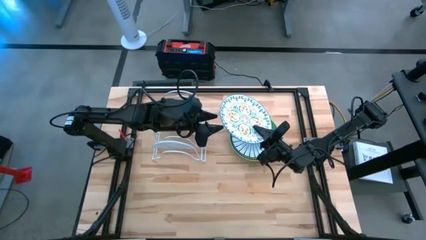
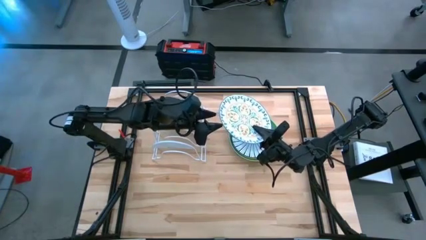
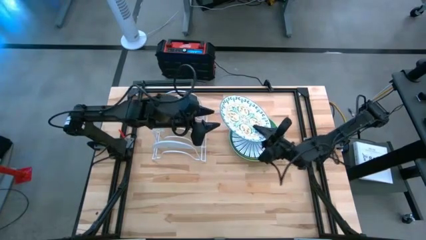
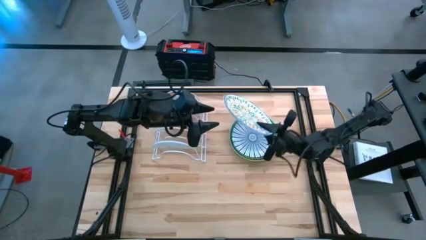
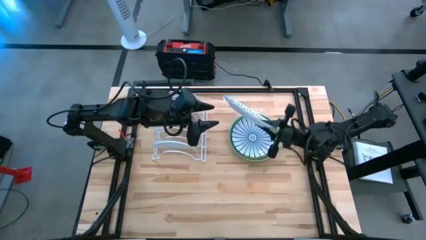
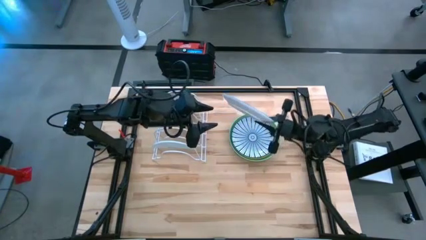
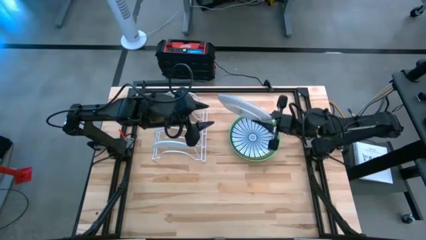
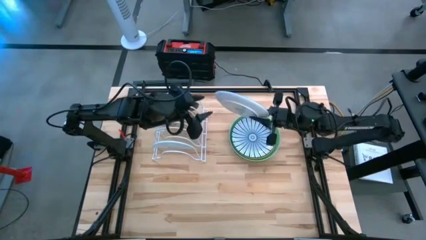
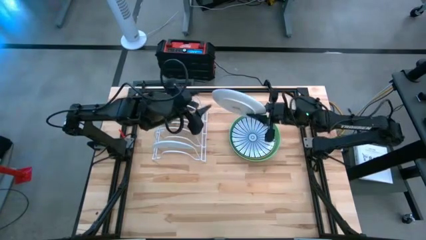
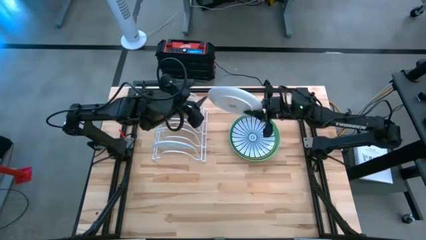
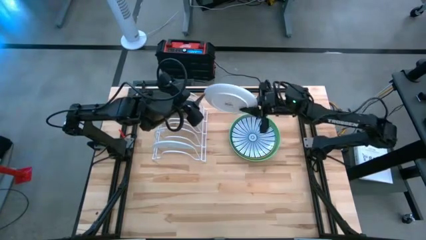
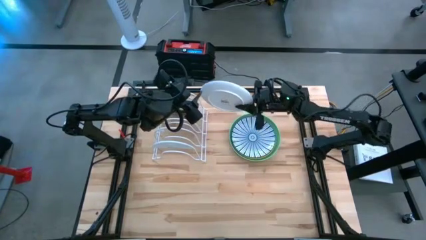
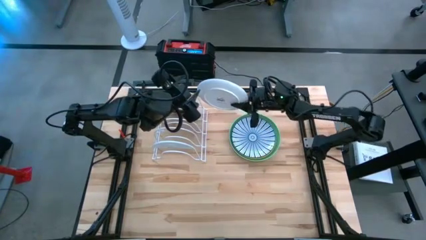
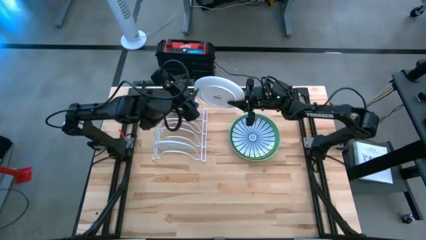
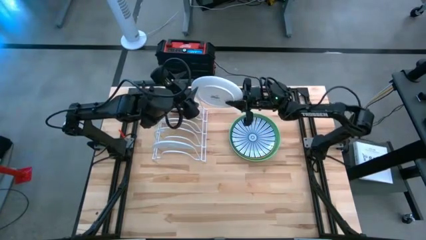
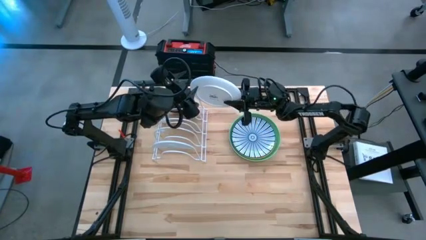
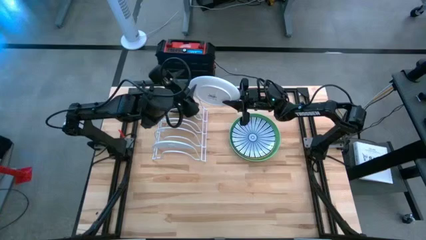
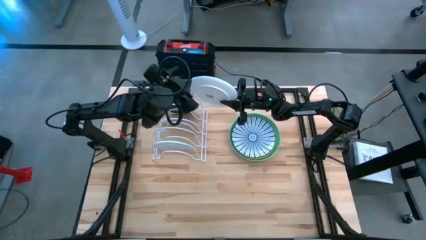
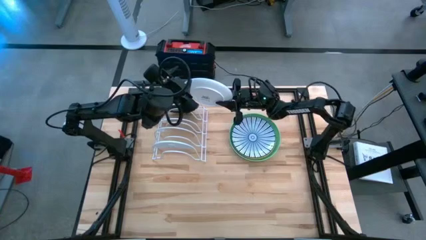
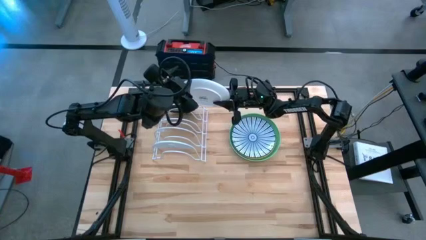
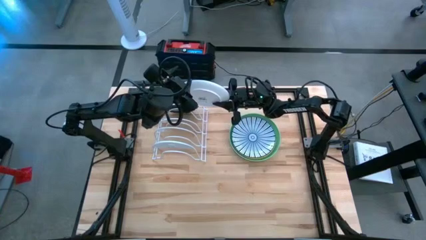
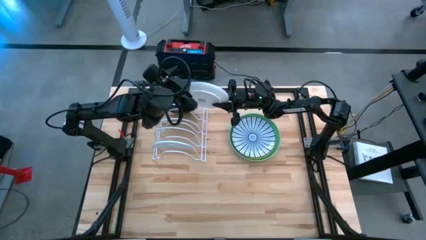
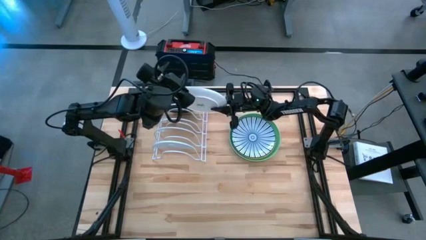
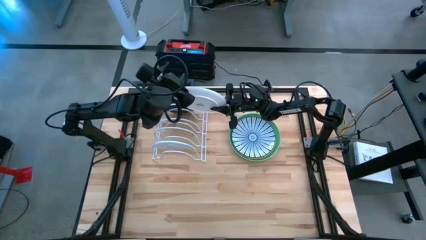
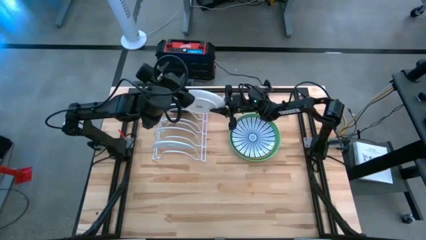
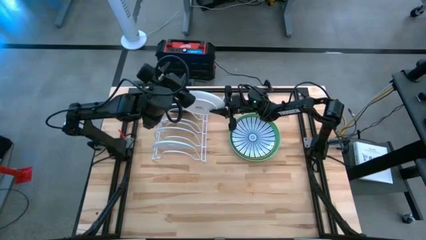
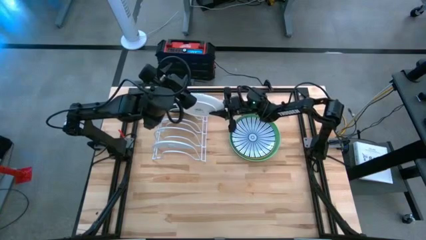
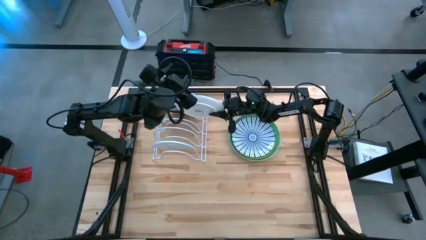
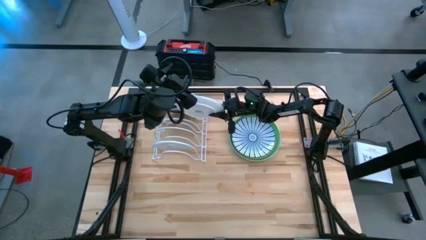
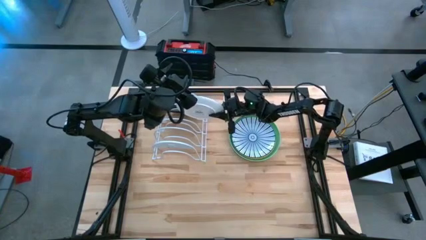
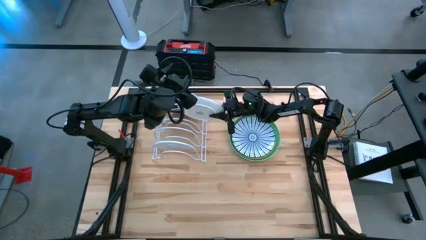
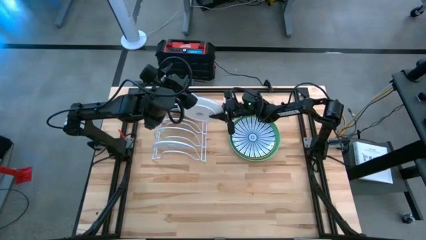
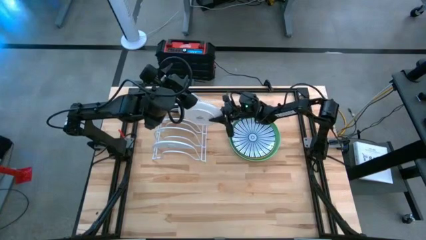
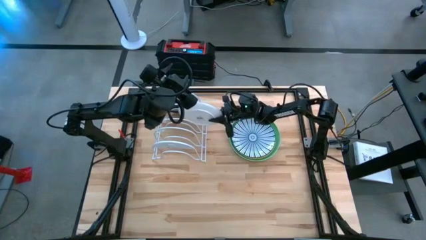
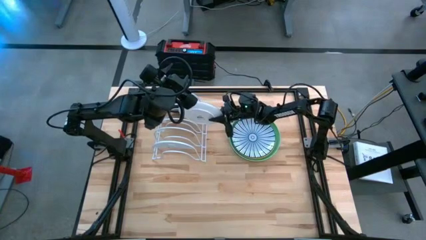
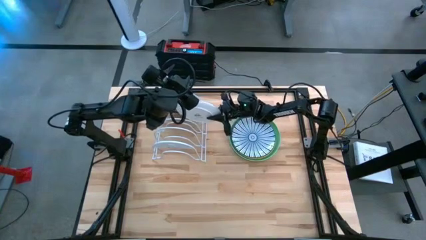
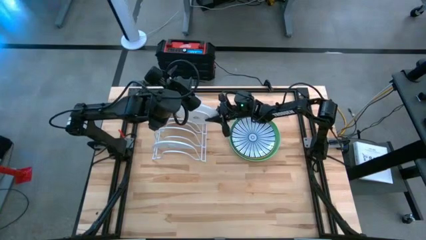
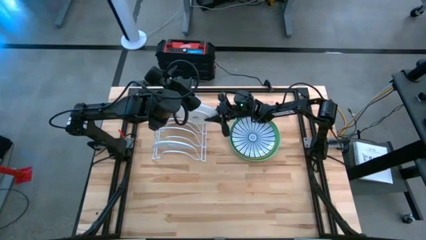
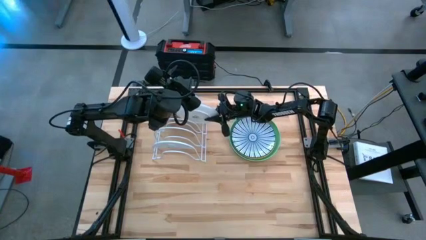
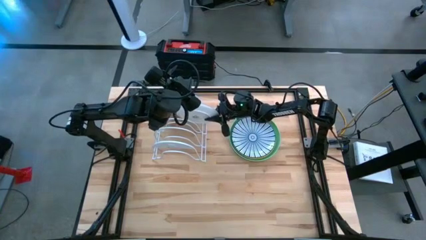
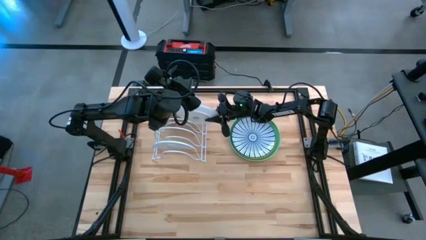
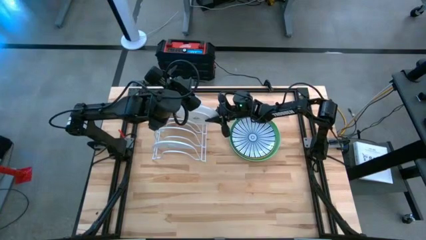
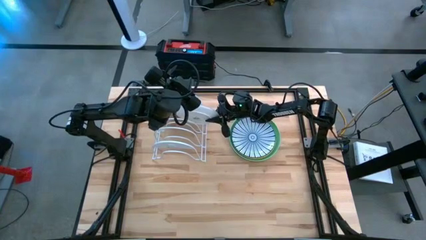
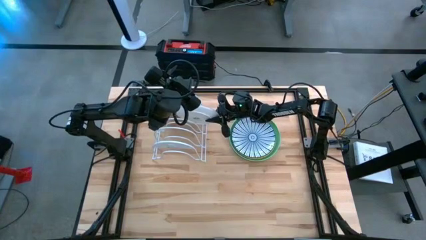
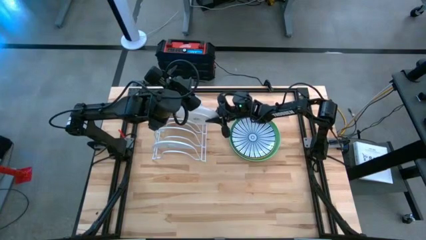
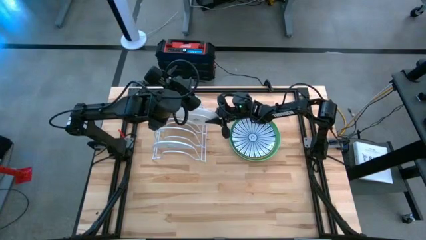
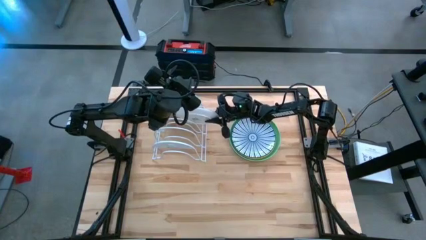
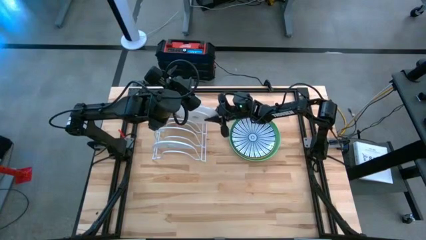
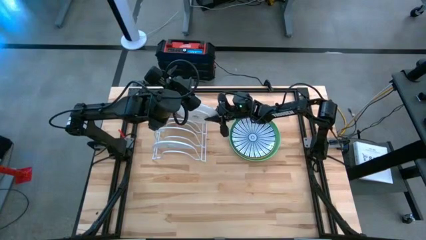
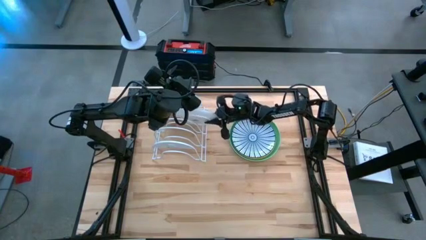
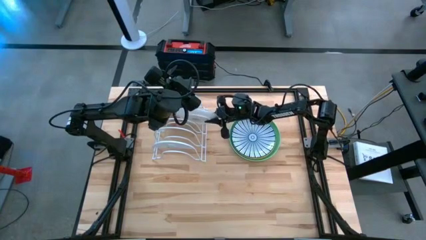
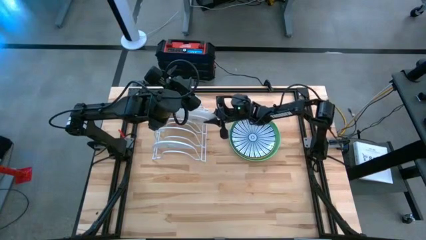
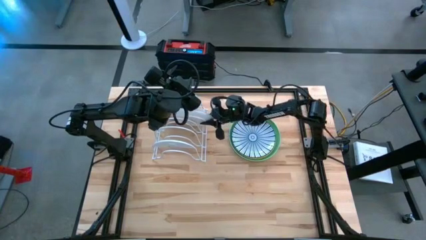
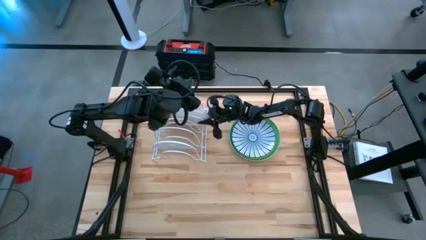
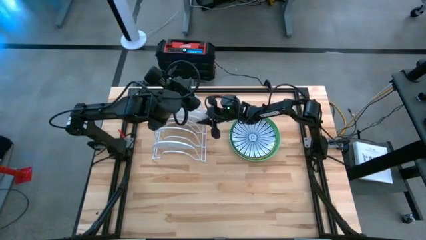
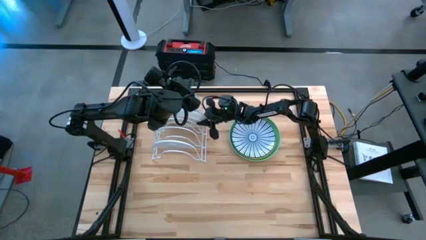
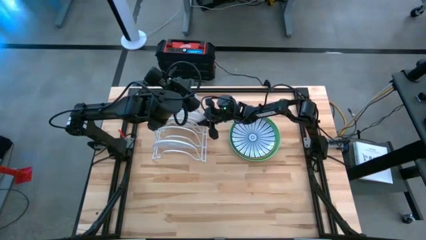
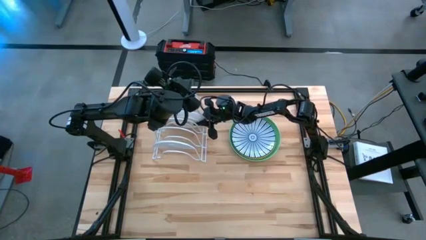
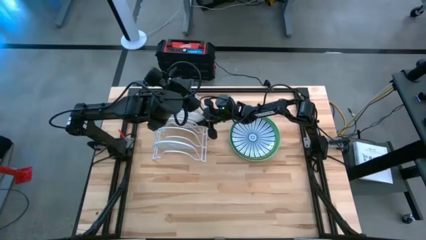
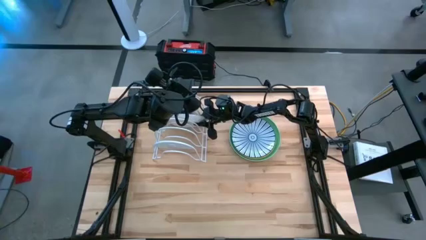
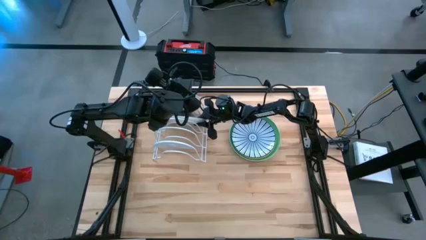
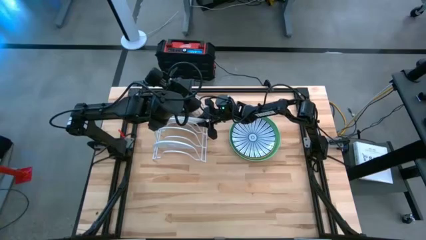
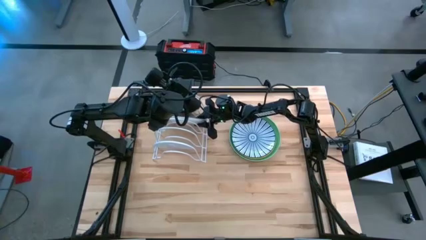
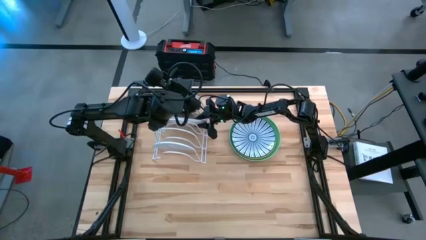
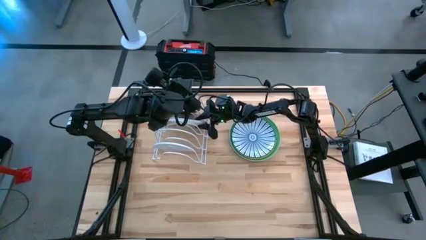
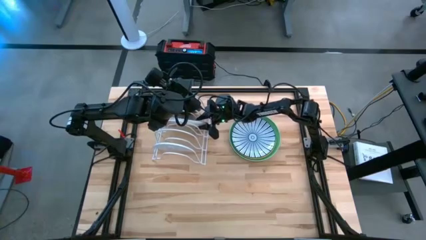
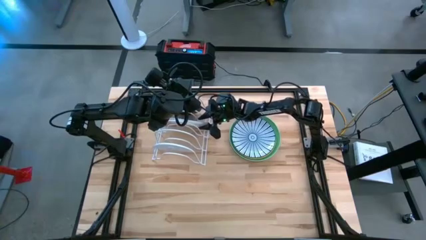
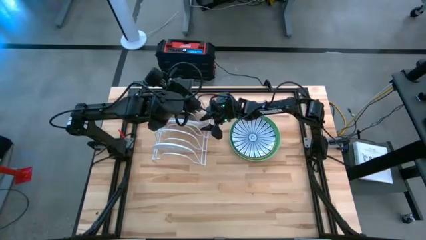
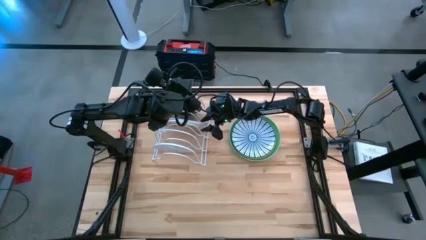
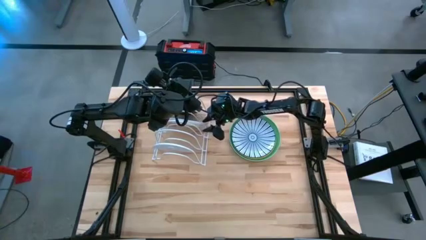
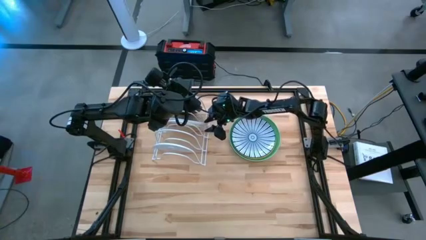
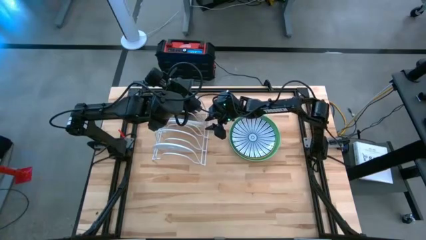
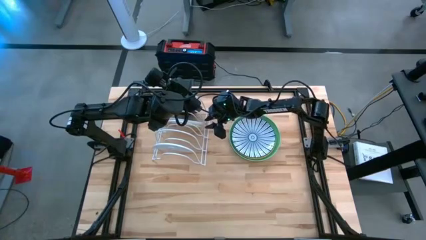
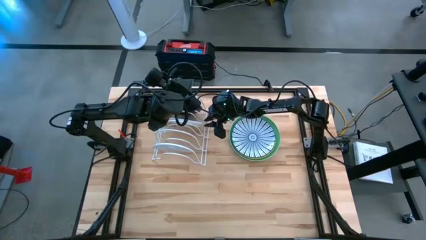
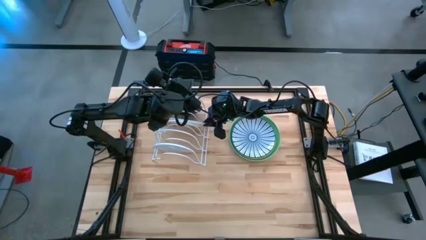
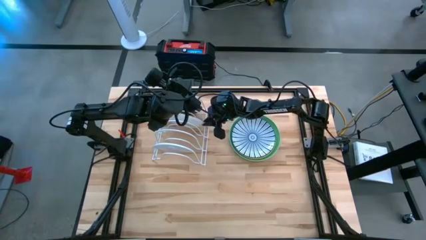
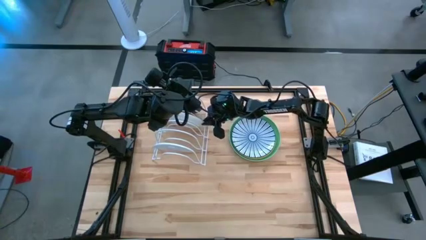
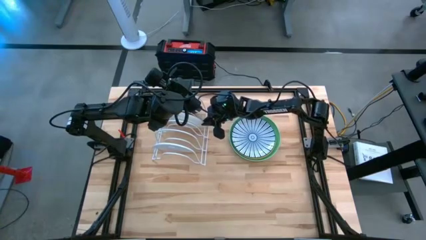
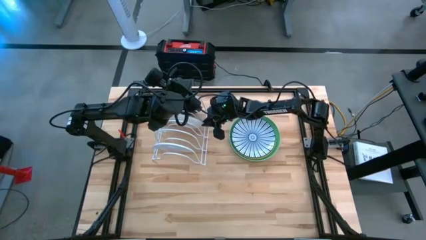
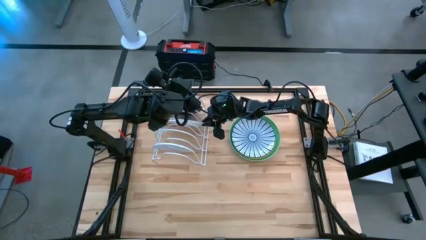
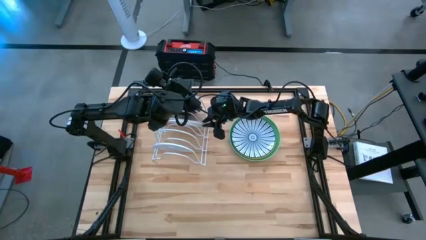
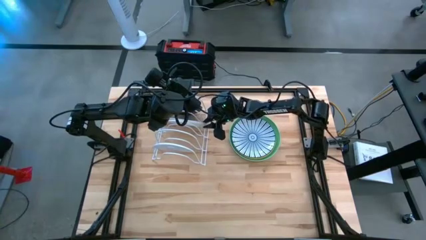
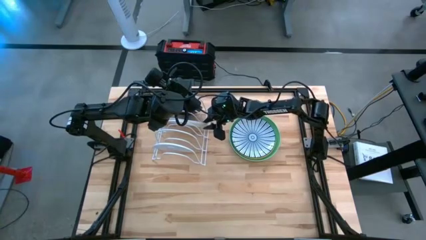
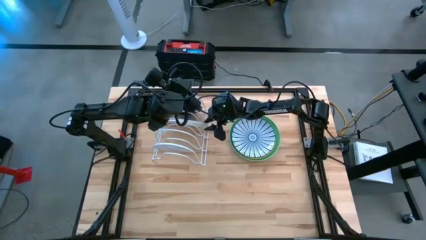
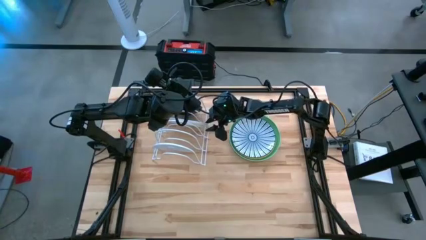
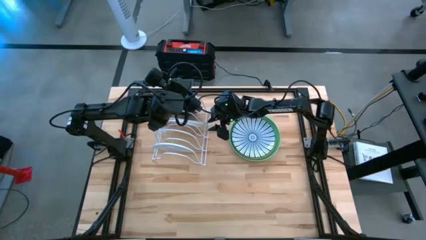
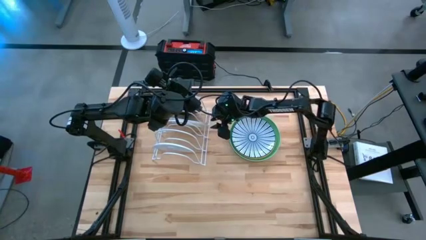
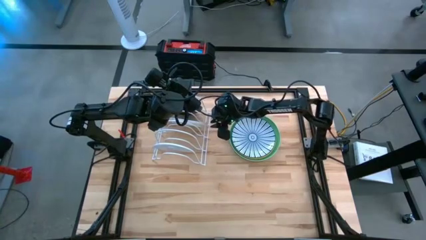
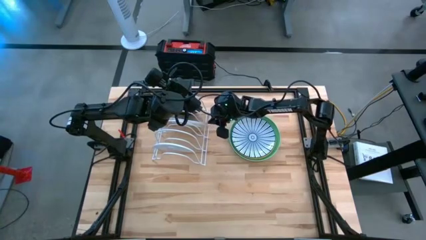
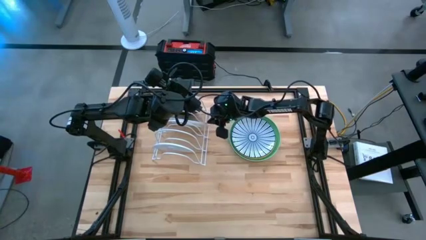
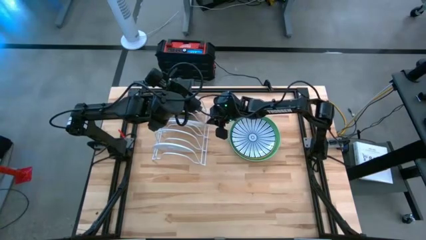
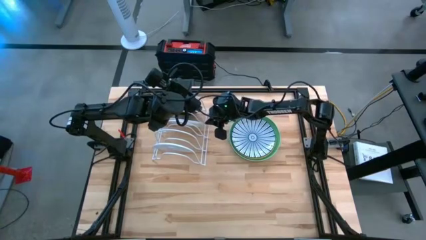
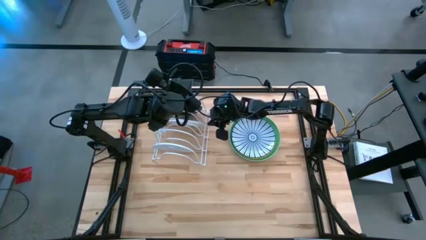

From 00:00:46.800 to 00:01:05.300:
Task: Sort dishes
Put the white pattern plate in the dish rack
